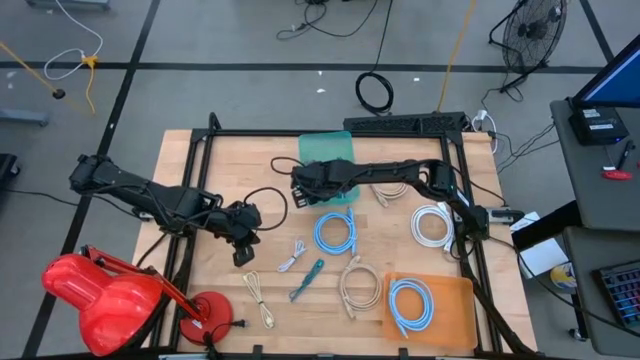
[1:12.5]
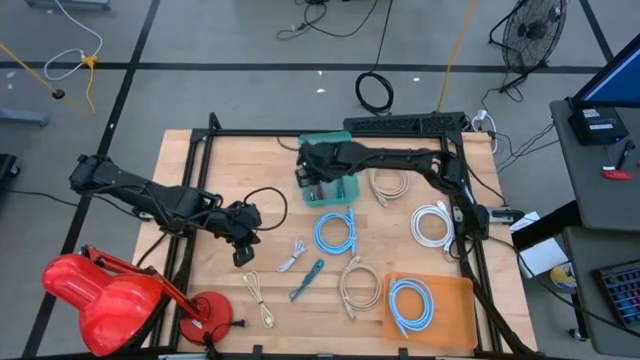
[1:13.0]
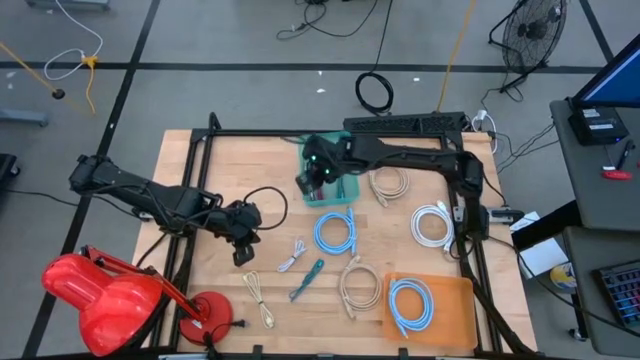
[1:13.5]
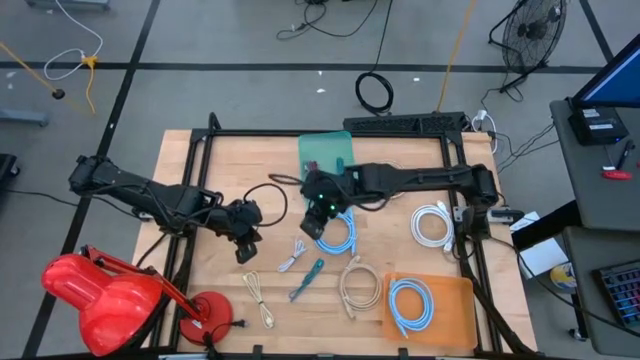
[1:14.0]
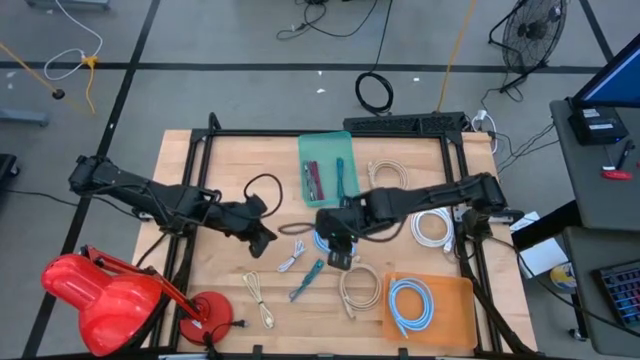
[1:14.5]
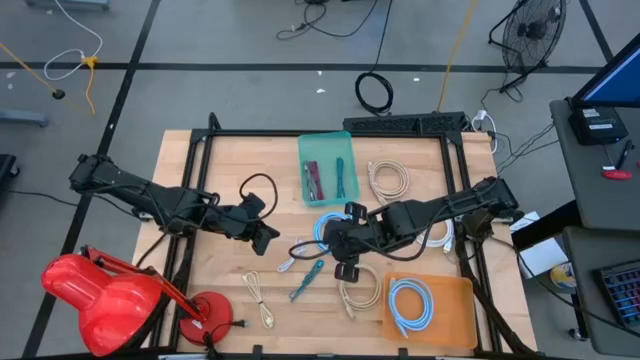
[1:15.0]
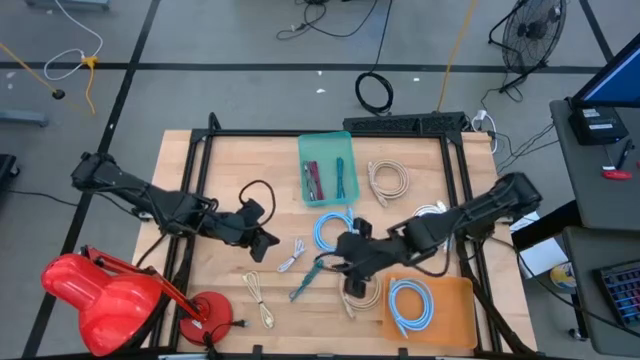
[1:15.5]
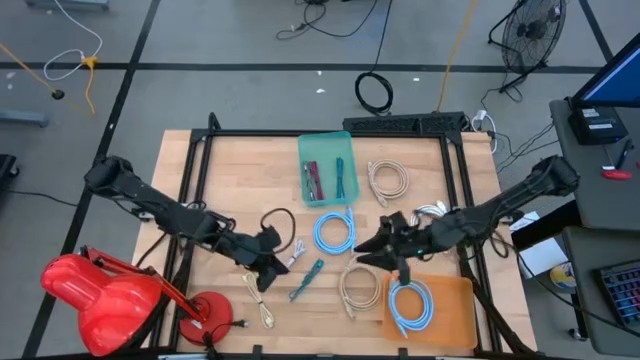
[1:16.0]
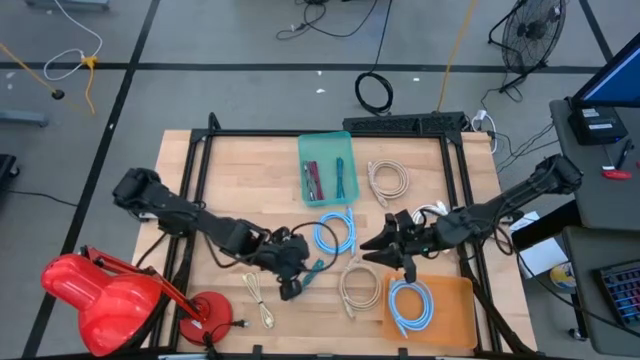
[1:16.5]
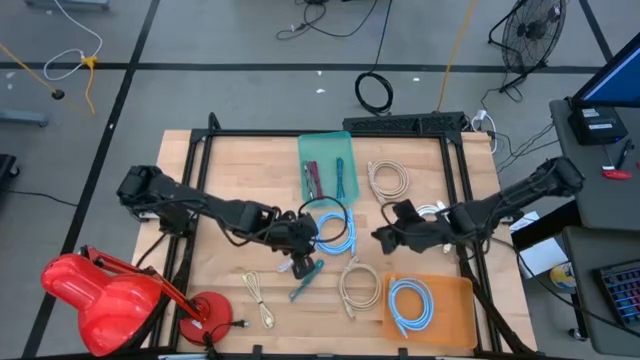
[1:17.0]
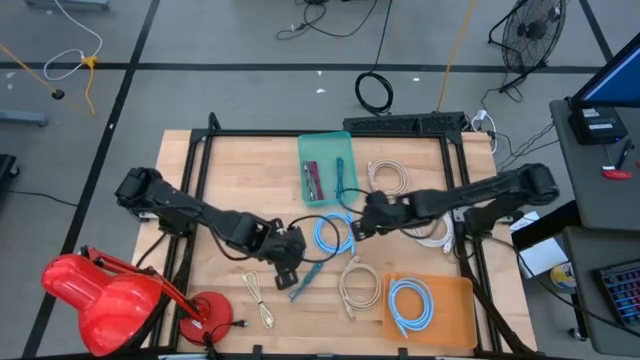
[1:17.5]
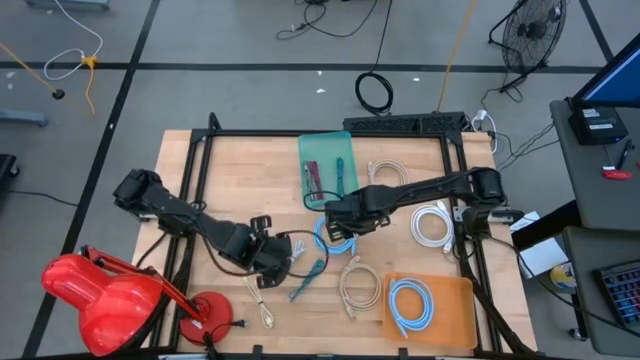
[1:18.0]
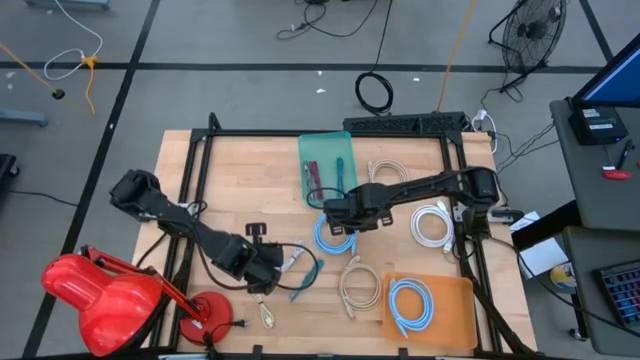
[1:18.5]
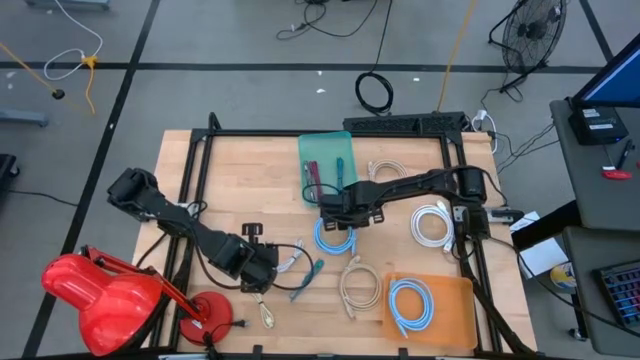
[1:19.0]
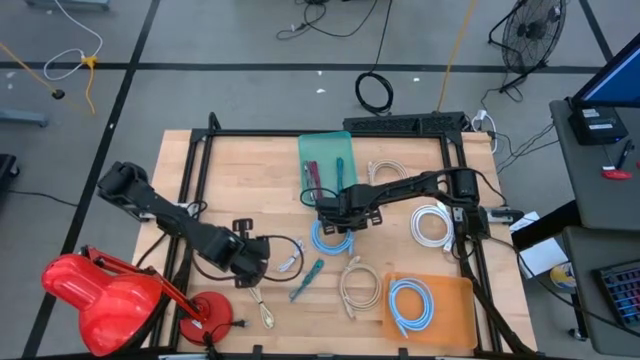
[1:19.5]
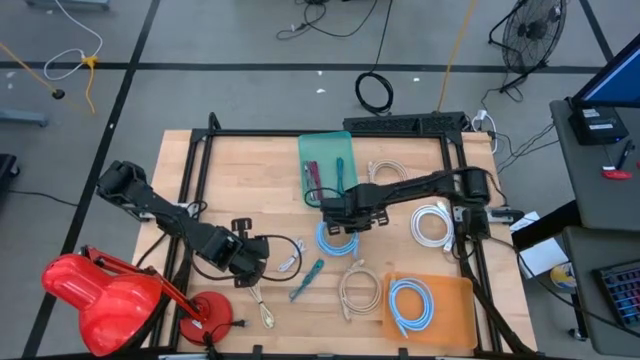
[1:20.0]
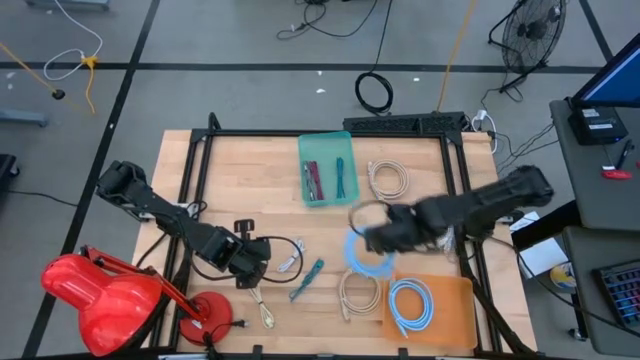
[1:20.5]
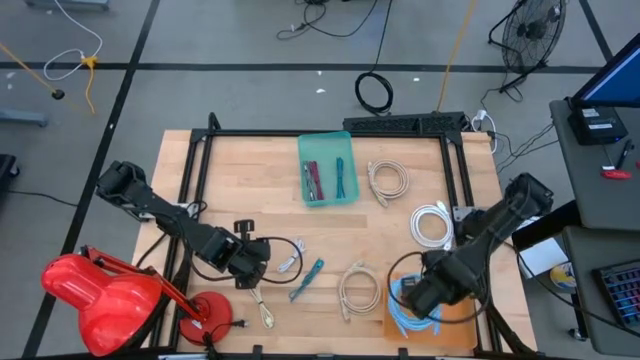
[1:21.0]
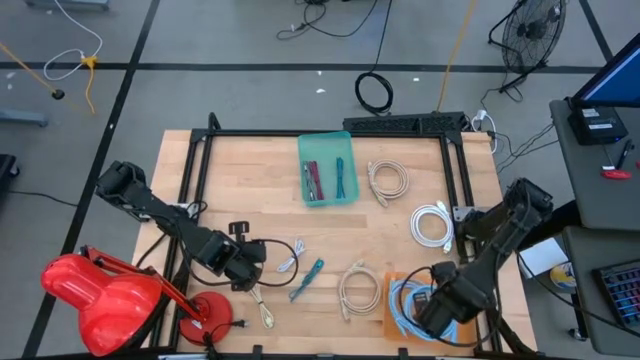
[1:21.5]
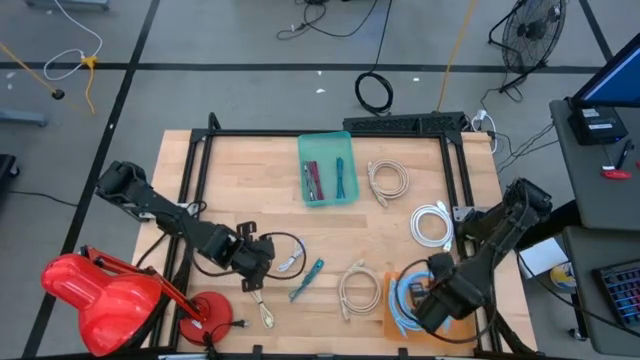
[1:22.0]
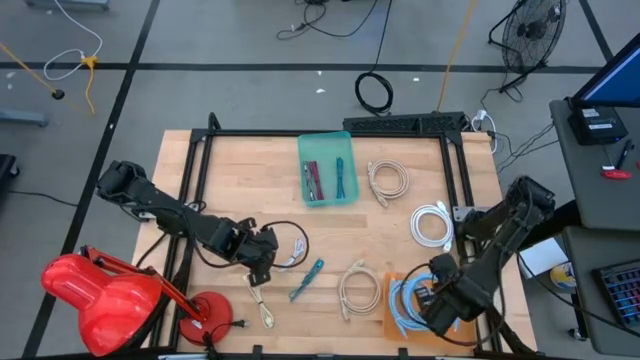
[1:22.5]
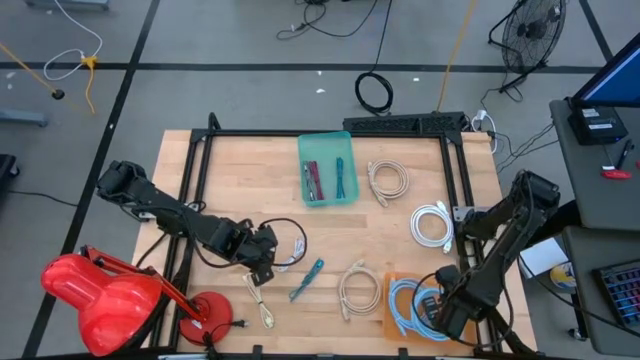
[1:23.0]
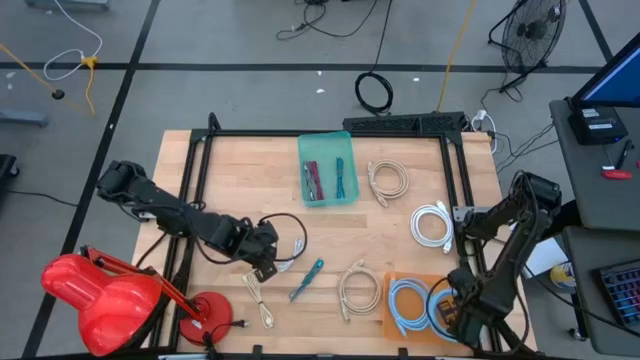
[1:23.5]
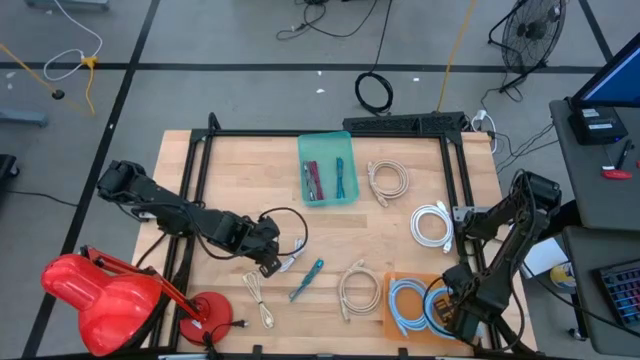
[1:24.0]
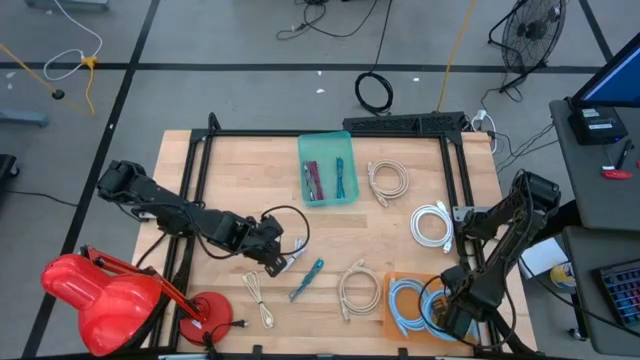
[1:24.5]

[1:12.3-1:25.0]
Task: Pick & Place USB Port
Put the light blue charger cable into the orange bin

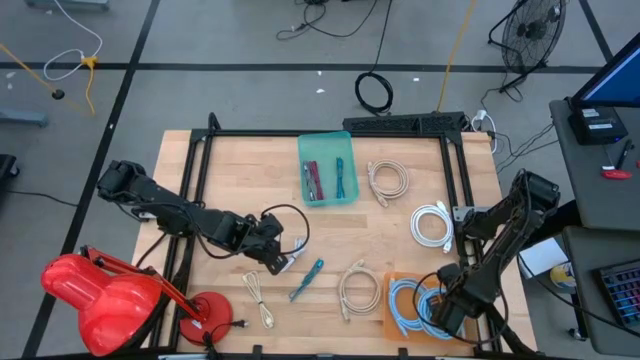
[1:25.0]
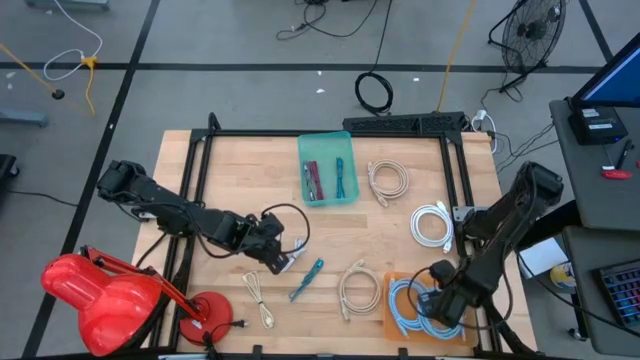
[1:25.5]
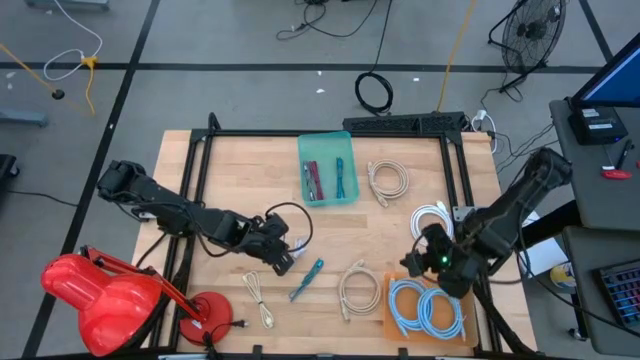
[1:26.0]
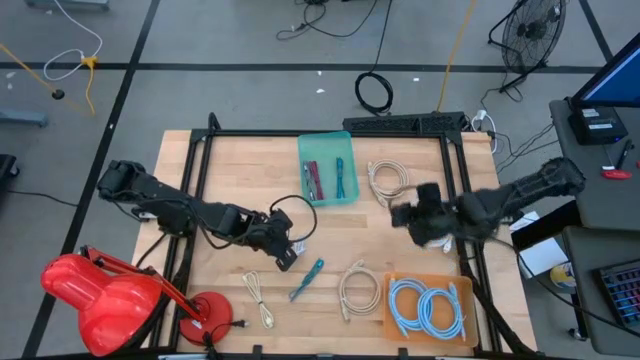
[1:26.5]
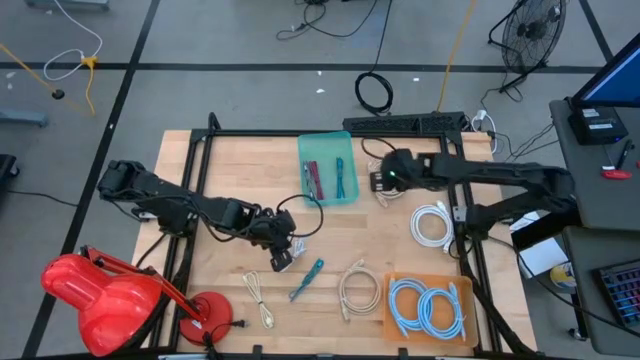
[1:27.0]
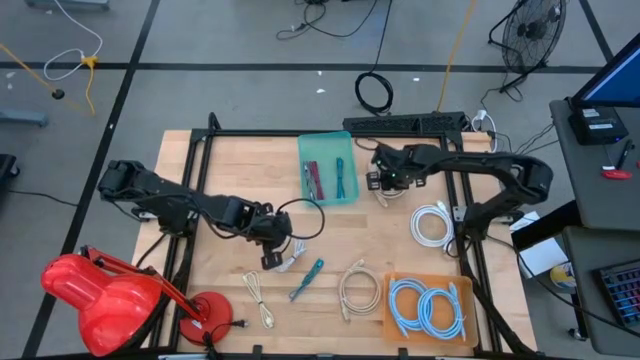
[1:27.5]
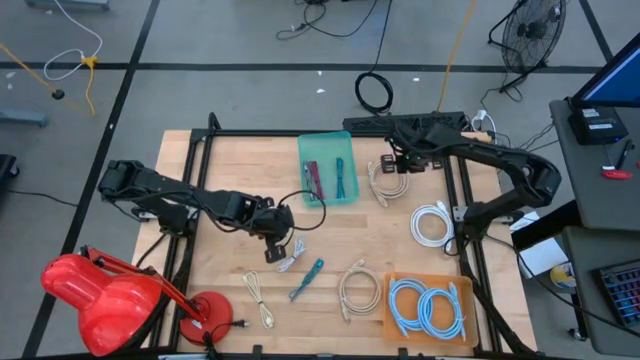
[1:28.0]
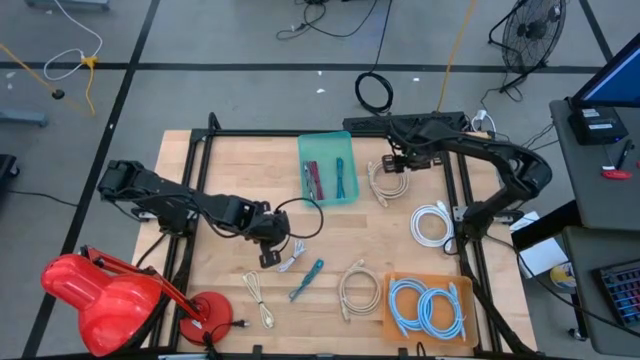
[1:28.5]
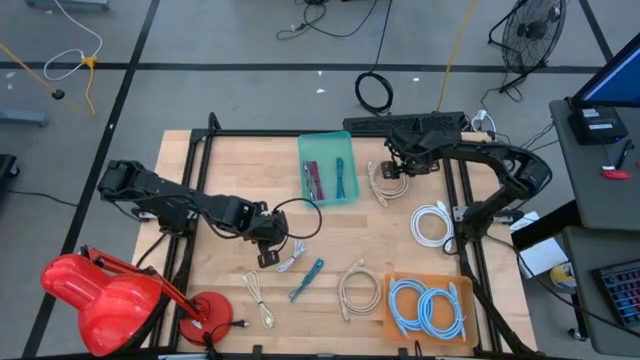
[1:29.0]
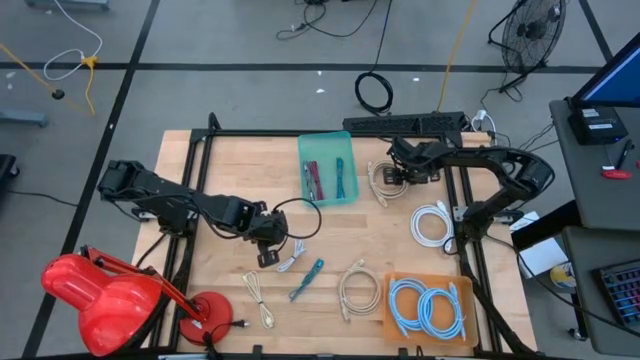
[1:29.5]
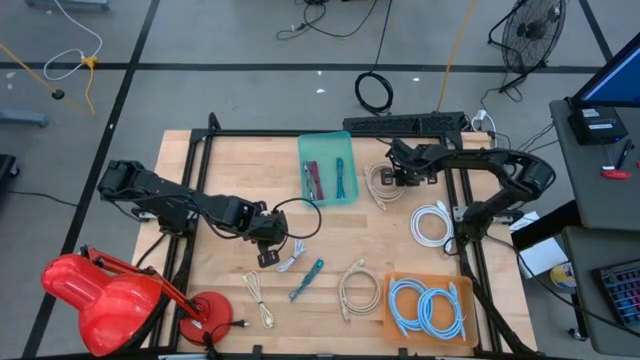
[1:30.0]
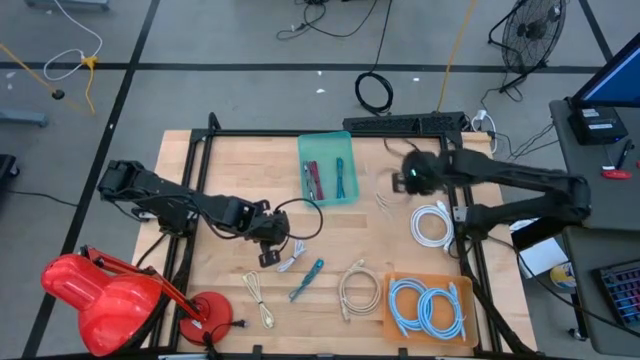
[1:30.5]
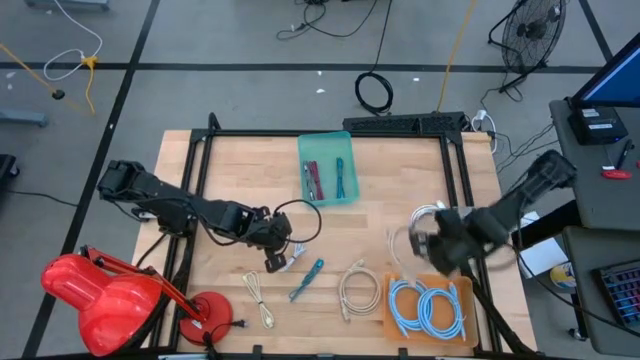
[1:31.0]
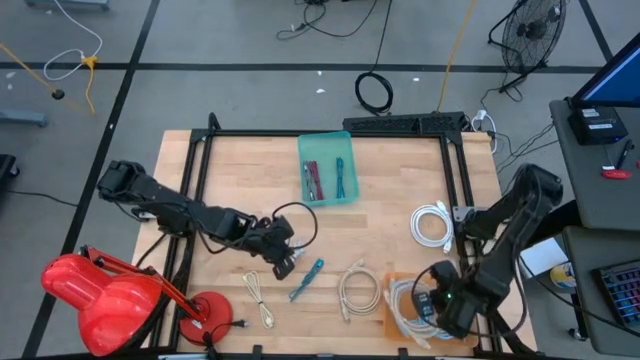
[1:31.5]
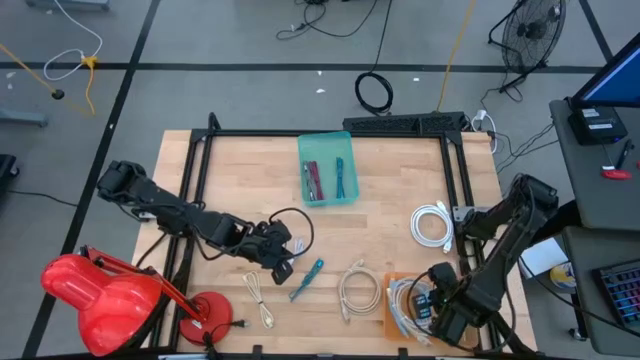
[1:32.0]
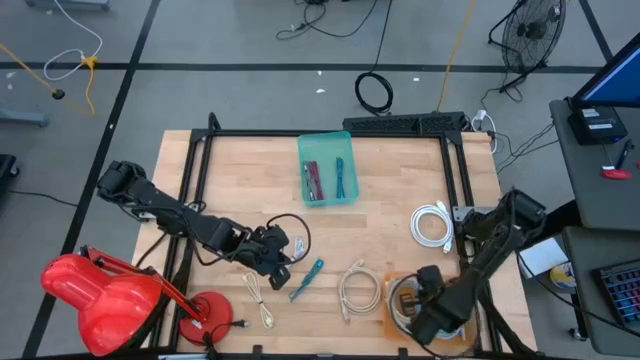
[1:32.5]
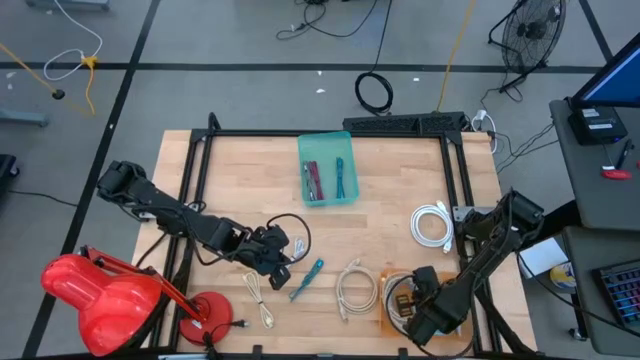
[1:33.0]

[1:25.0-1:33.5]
Put the top brown charger cable into the orange bin
